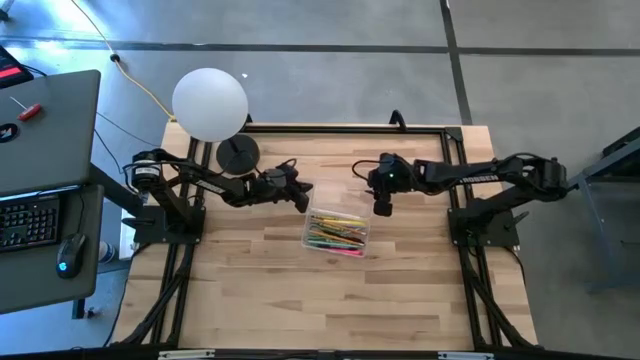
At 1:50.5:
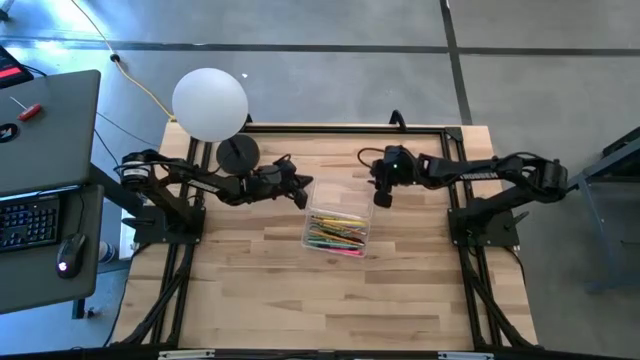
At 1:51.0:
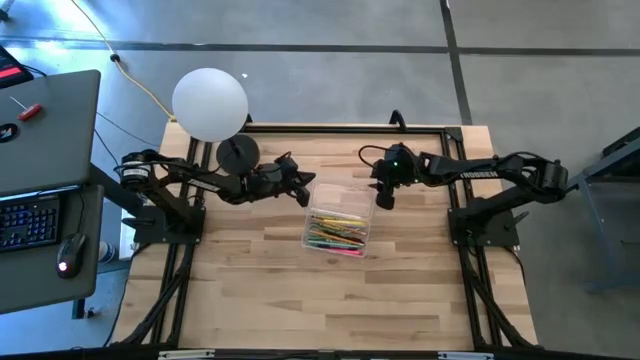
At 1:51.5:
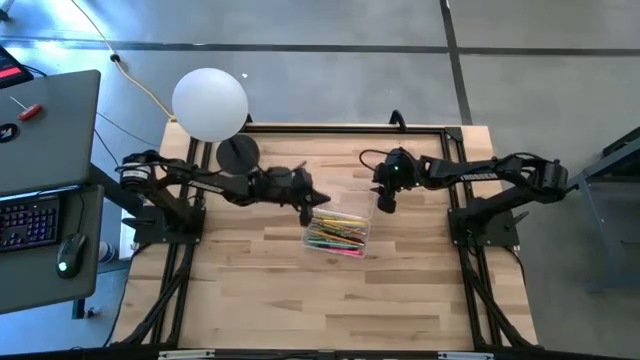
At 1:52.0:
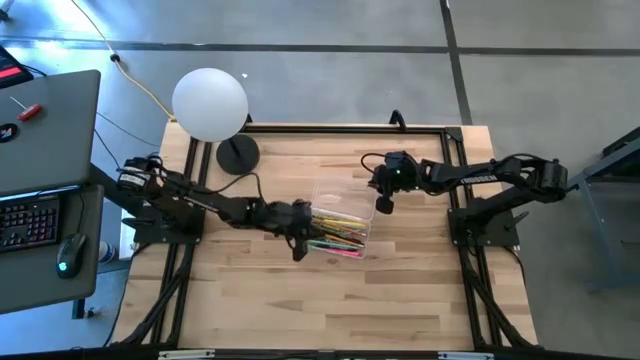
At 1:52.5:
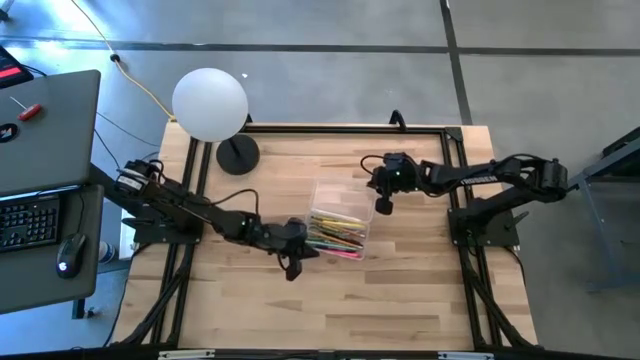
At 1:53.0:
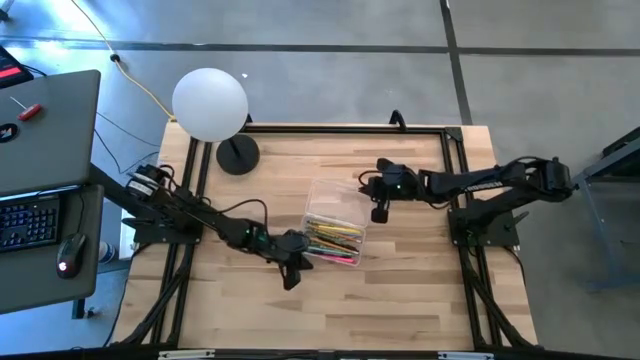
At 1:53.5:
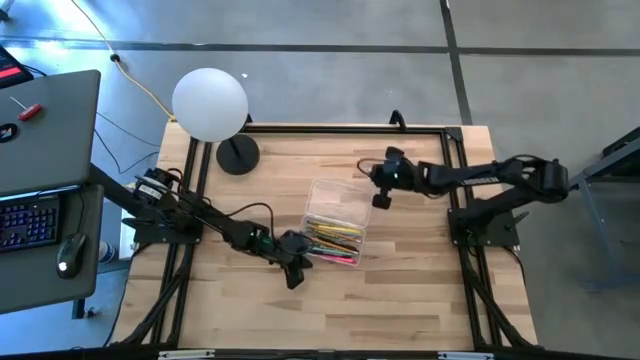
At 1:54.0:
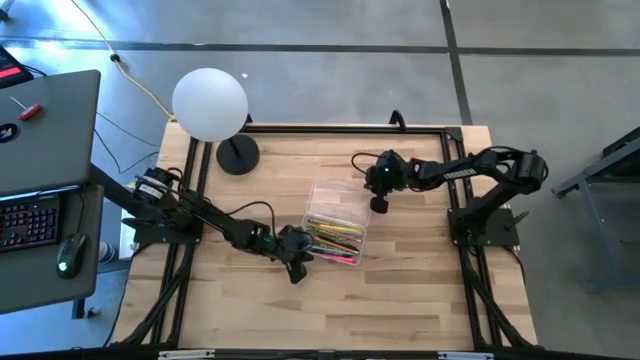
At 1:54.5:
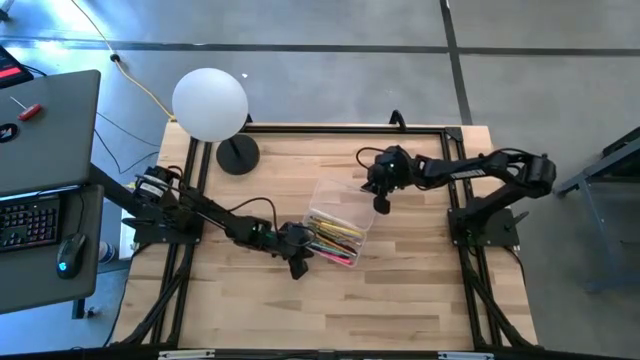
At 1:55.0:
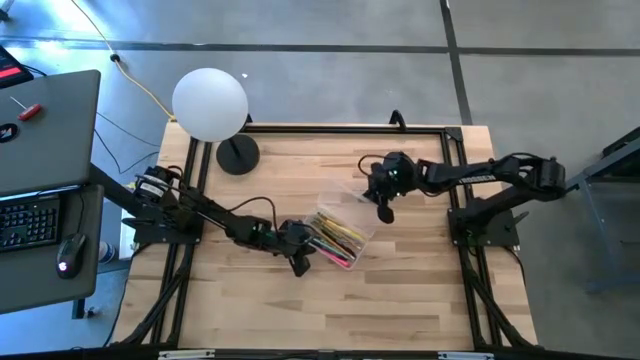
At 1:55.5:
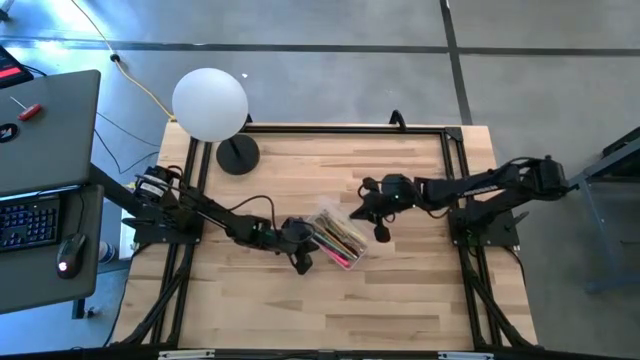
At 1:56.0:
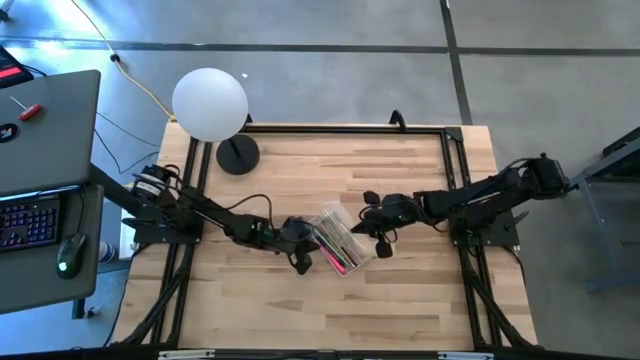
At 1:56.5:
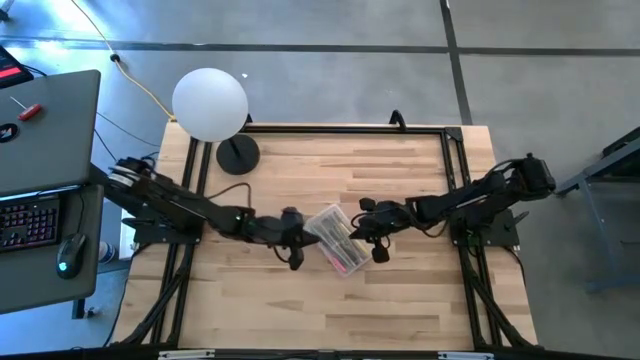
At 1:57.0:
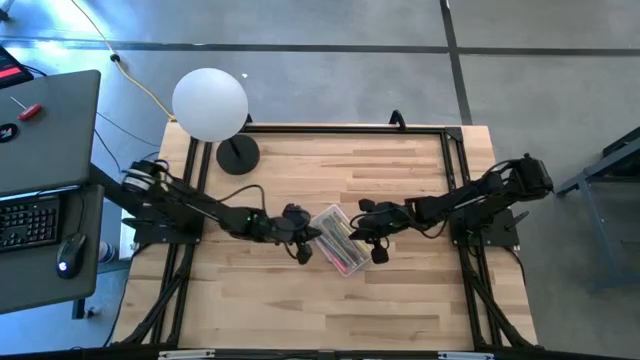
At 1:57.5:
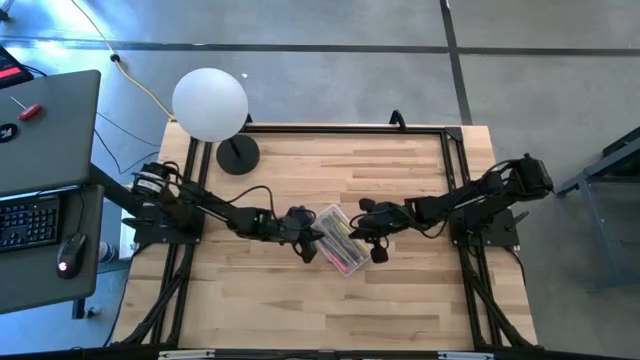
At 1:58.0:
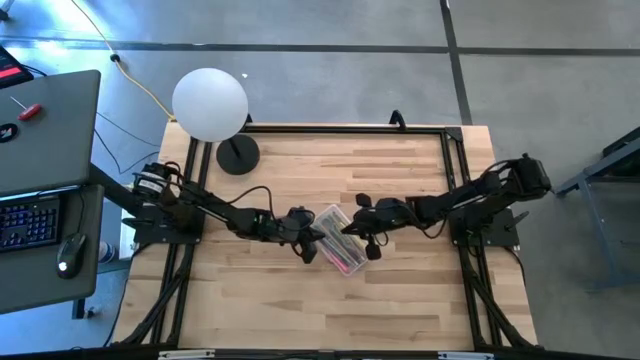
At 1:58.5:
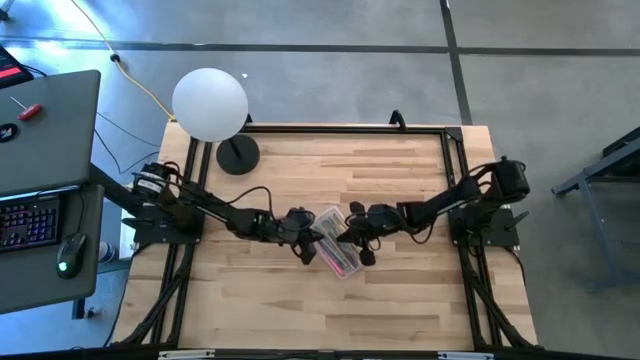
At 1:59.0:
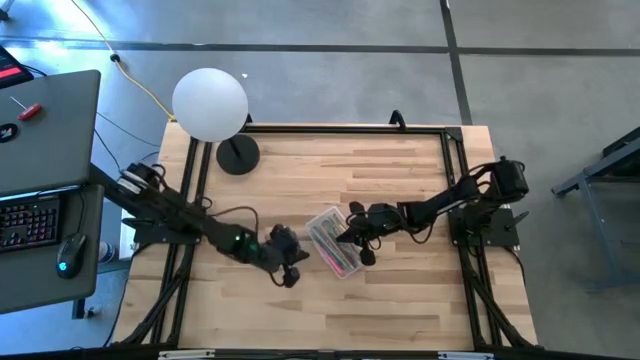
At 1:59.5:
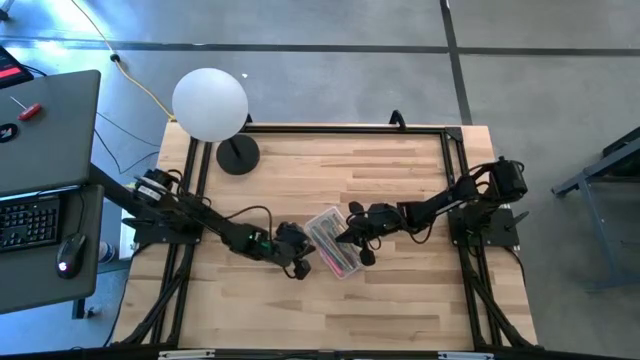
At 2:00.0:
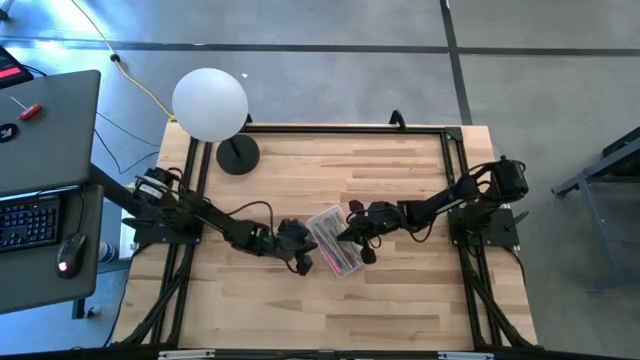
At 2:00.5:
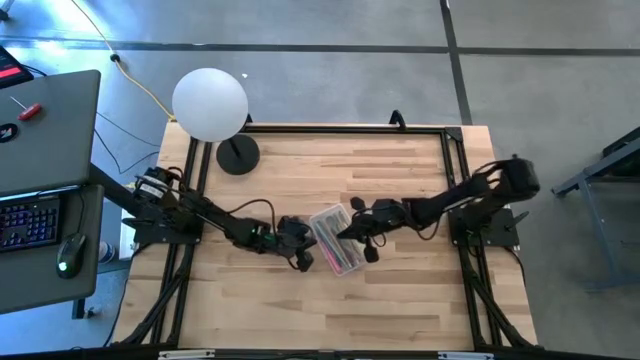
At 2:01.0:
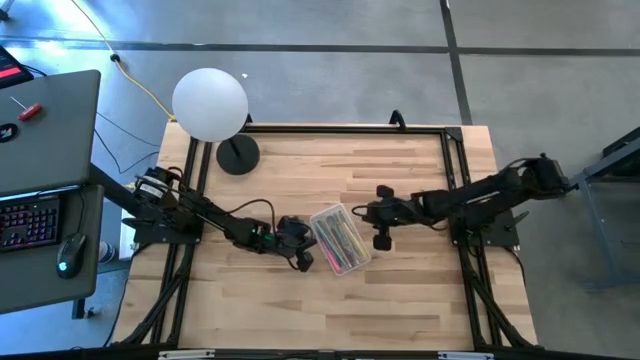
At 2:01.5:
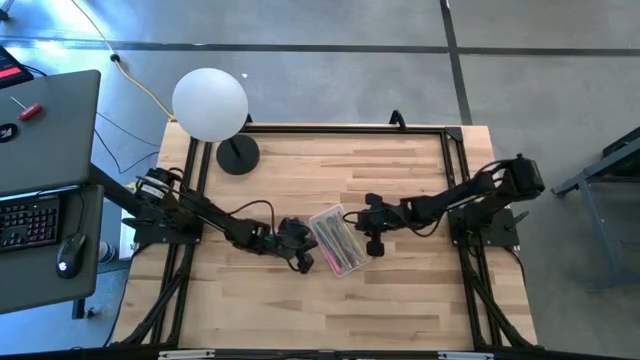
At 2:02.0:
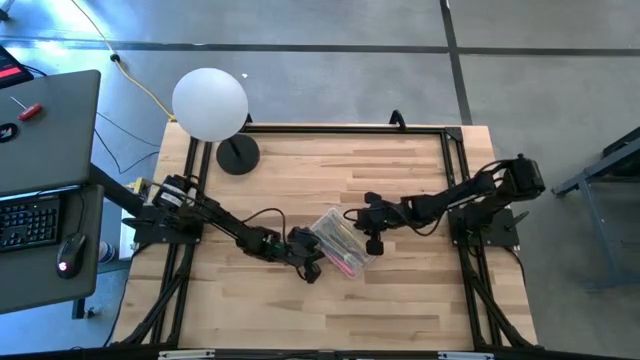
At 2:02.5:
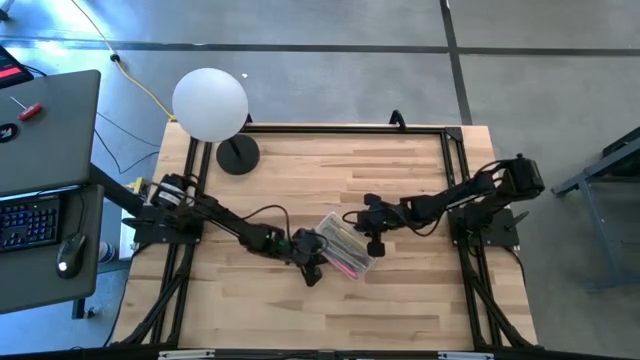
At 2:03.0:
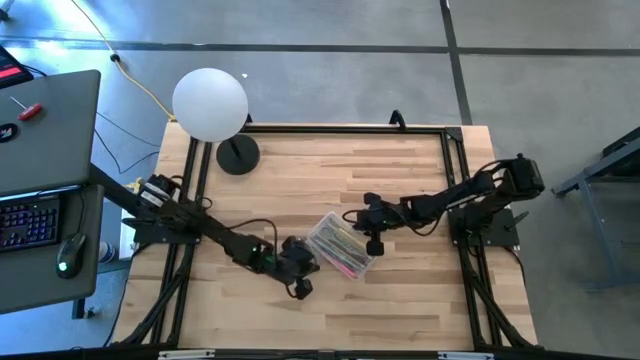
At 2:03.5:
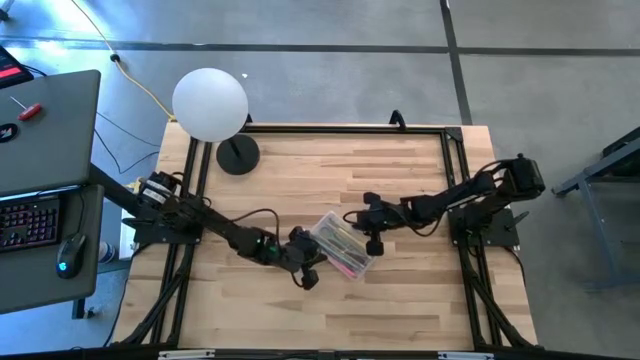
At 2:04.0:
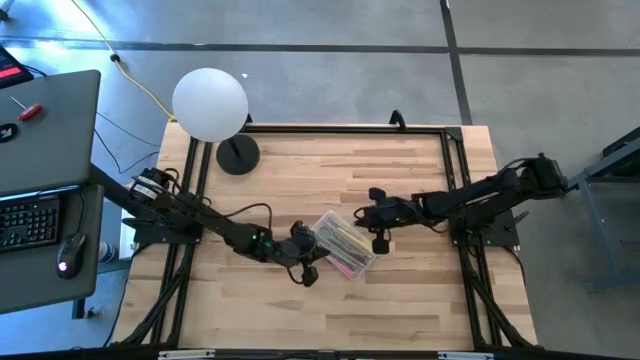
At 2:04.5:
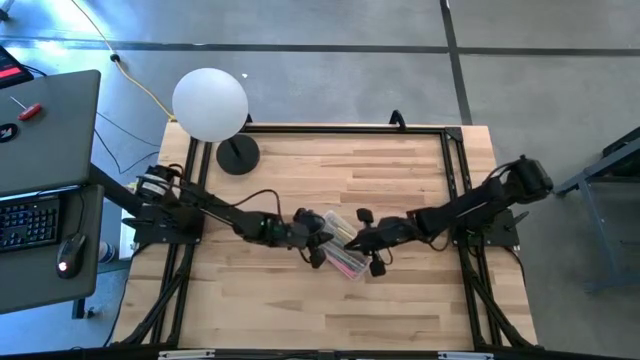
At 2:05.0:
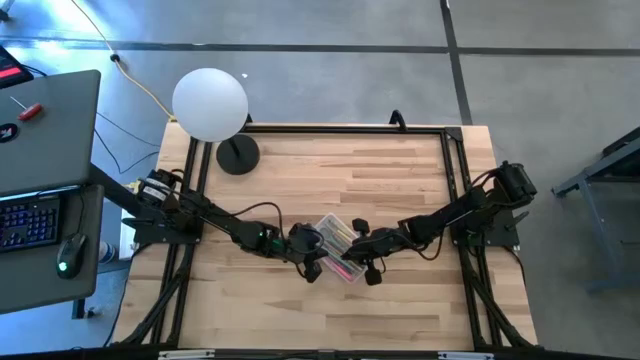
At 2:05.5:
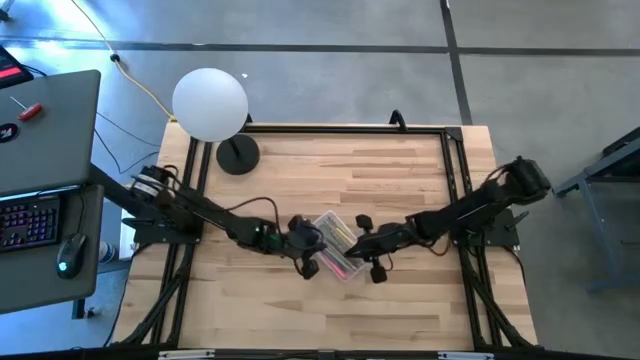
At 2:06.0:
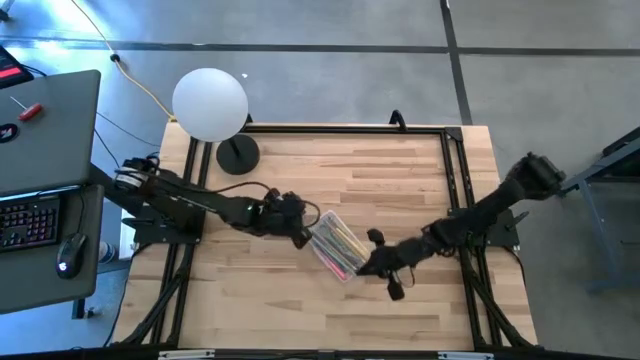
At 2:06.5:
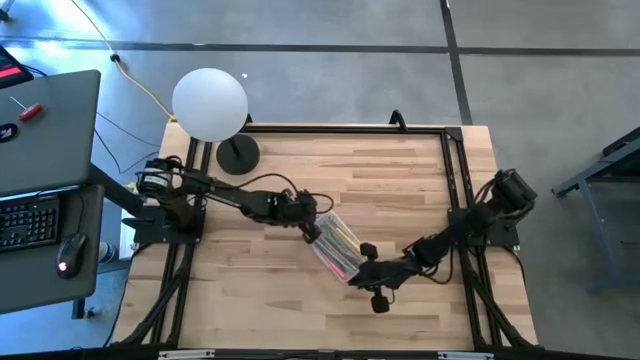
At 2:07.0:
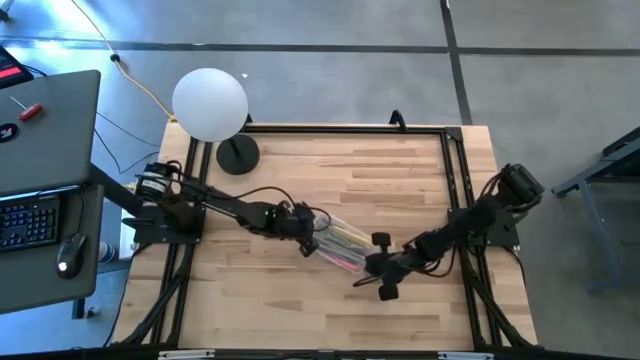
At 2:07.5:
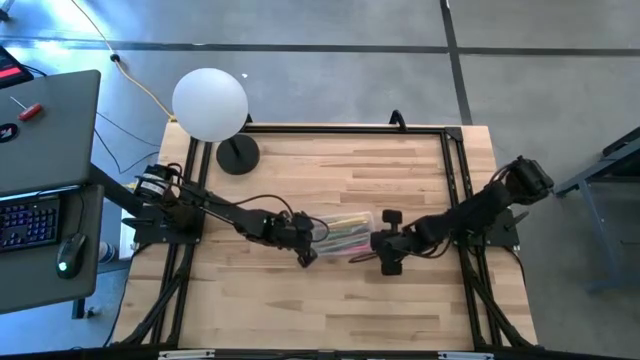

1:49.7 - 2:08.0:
Task: Pick & place school supplies into a supply box
Close the transparent supply box

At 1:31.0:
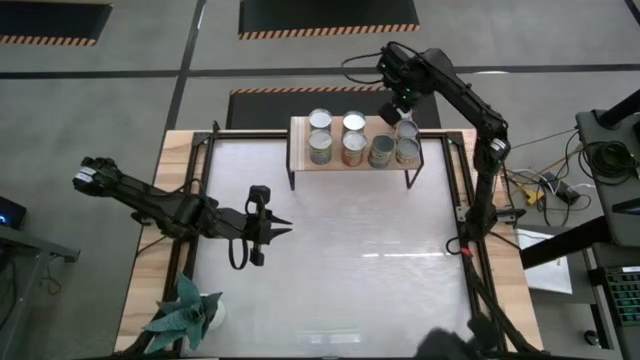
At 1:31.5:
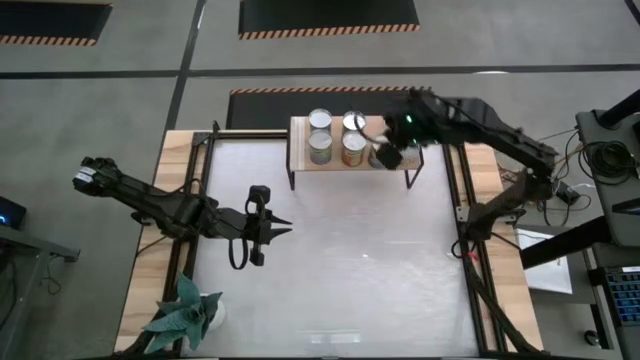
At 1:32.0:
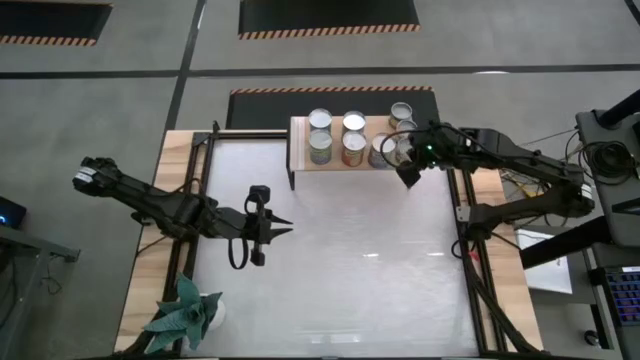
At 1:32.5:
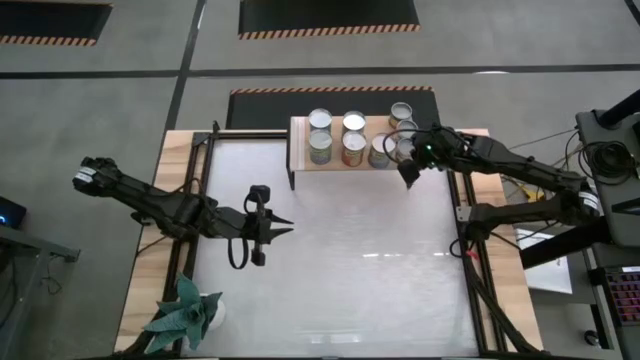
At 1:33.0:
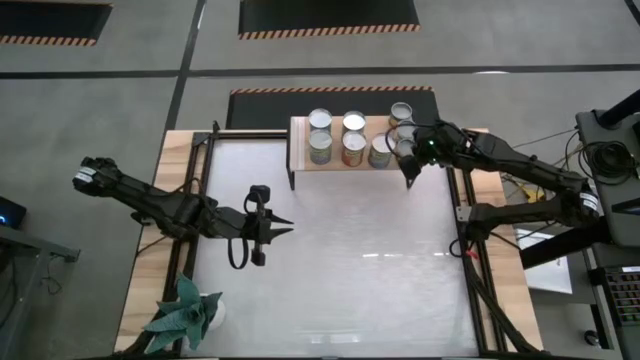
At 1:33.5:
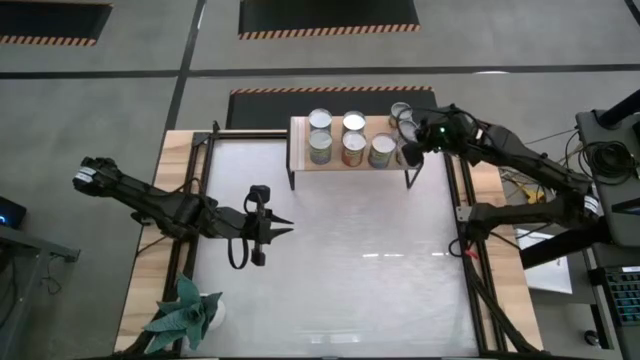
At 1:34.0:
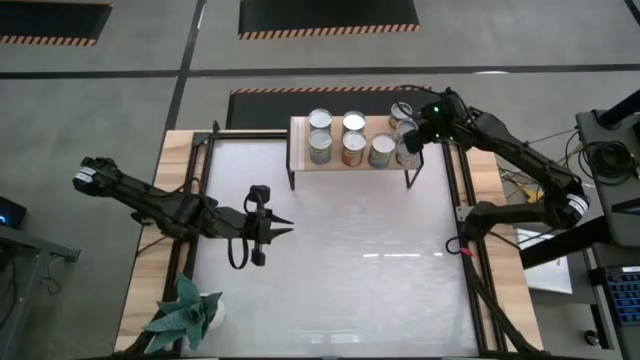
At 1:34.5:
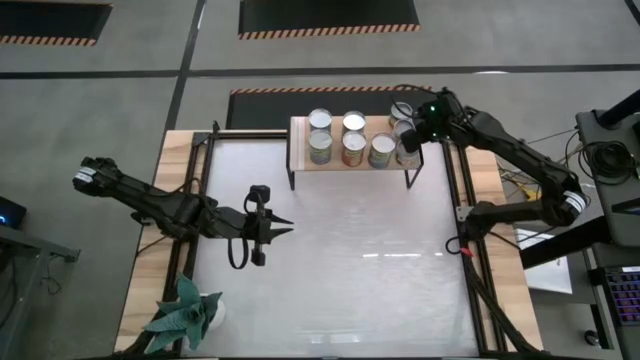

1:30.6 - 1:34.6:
Task: Pick and place cans onto a shelf
Adjust the canned goods
